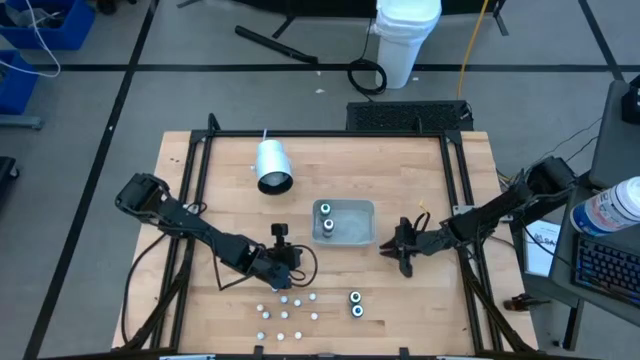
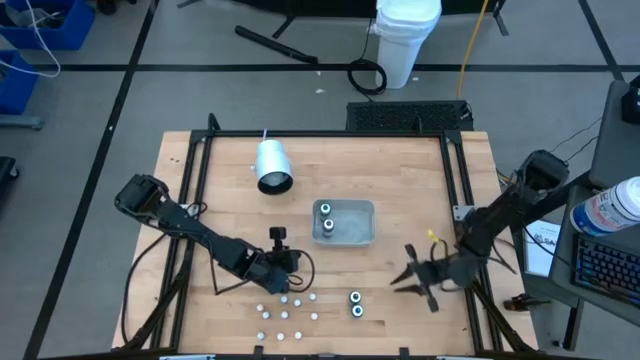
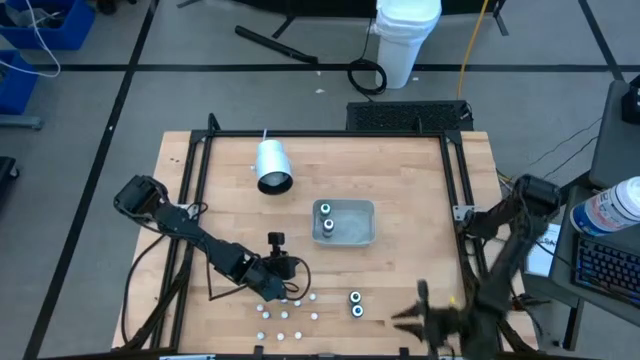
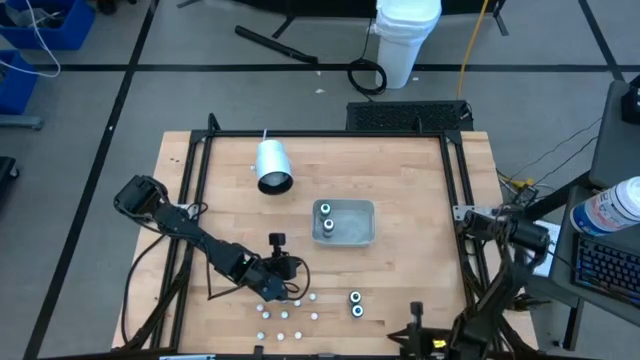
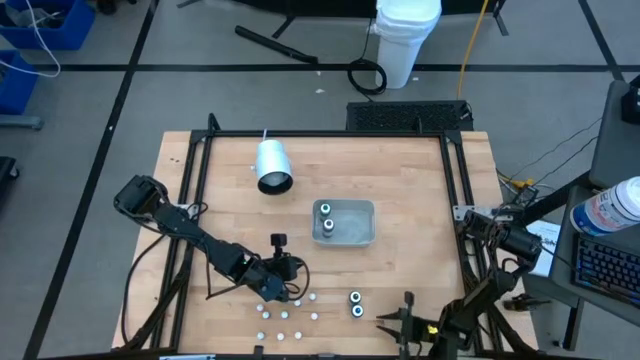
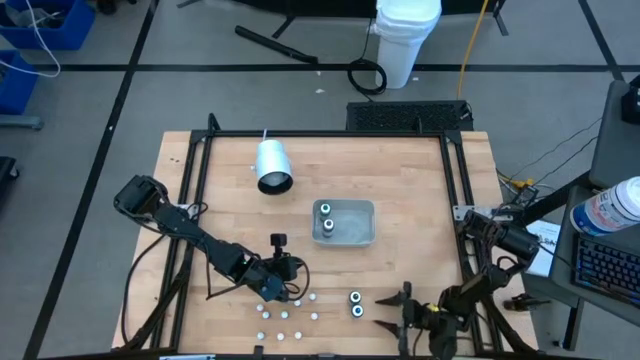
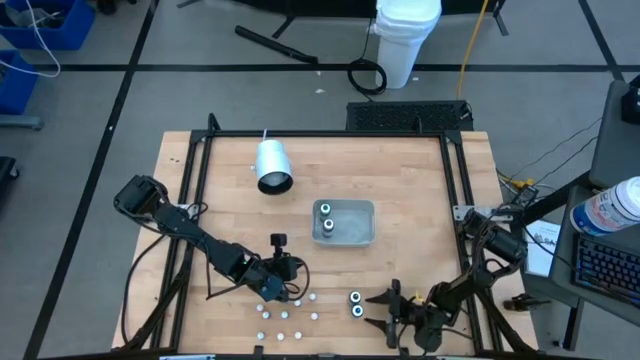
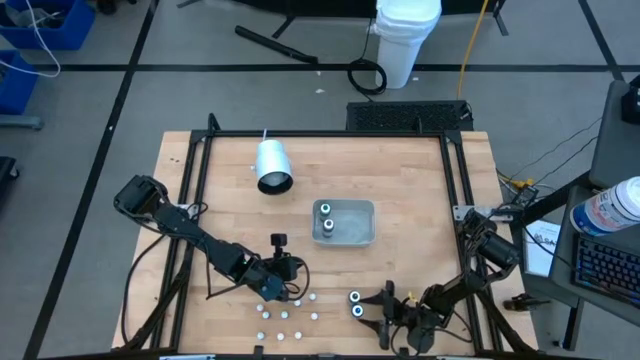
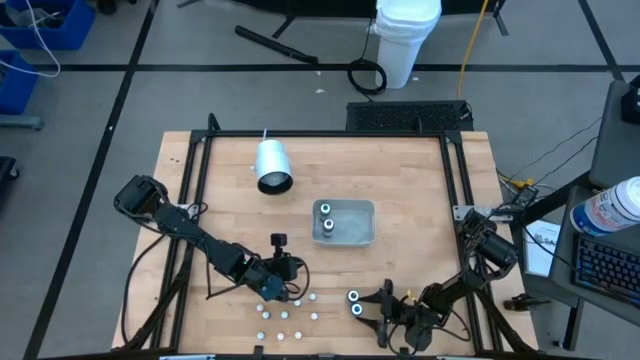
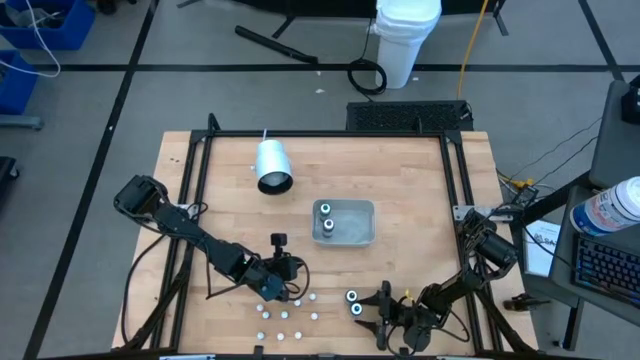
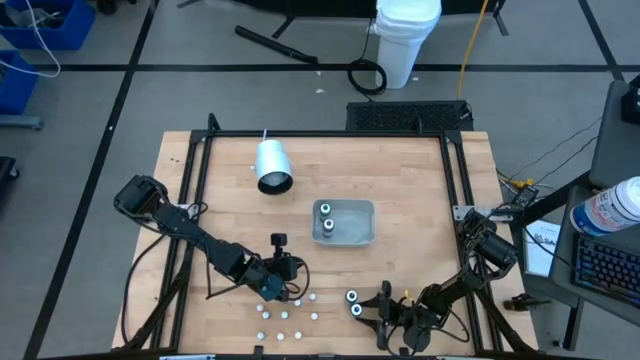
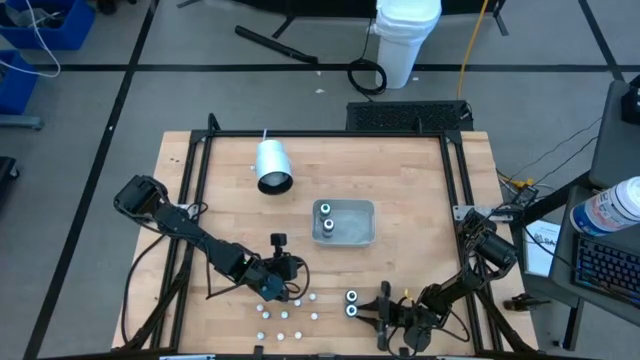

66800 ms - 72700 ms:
Task: Pick & Place food coloring
Put the large blue food coloring bottle into the white bin

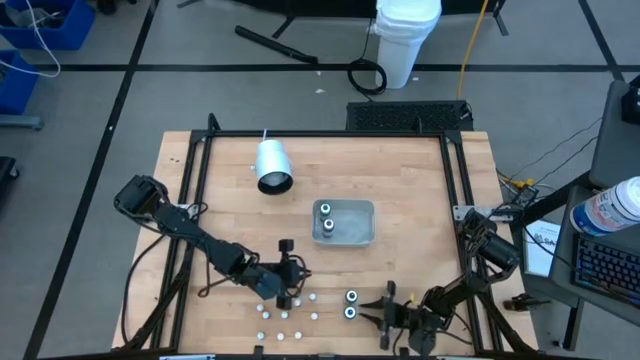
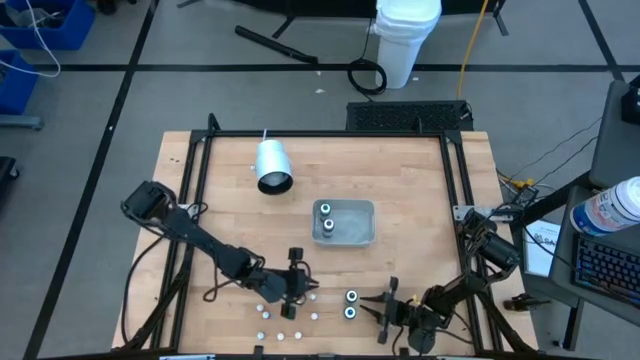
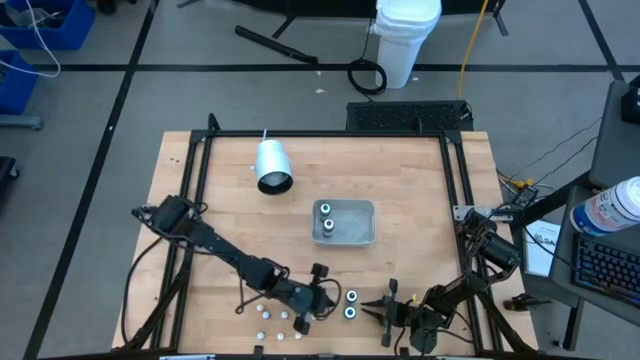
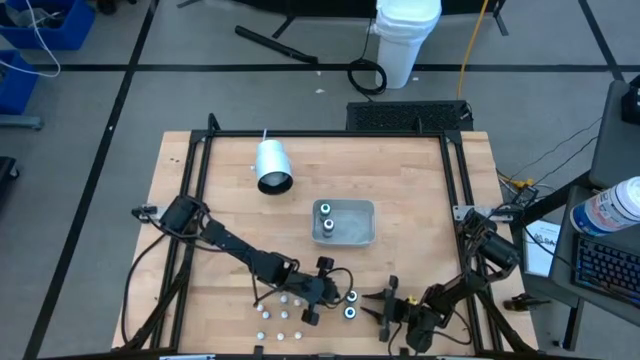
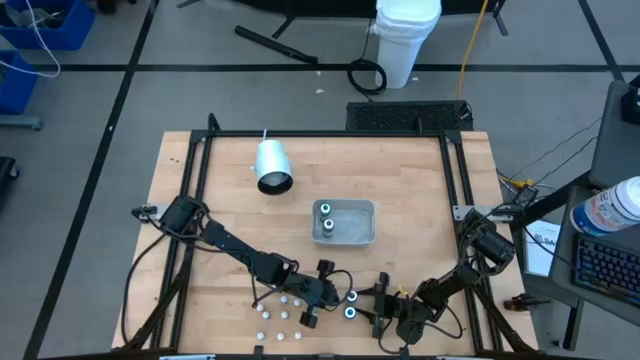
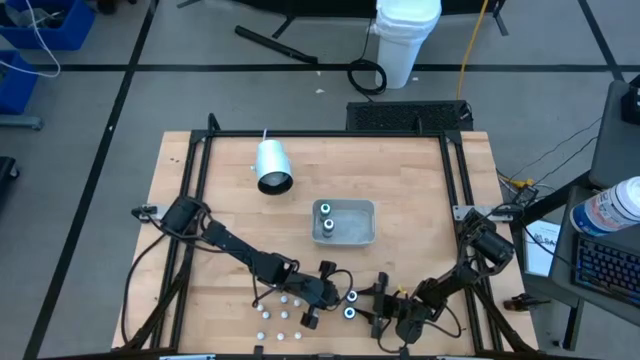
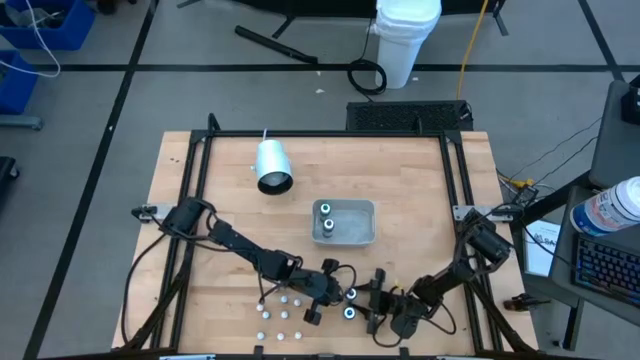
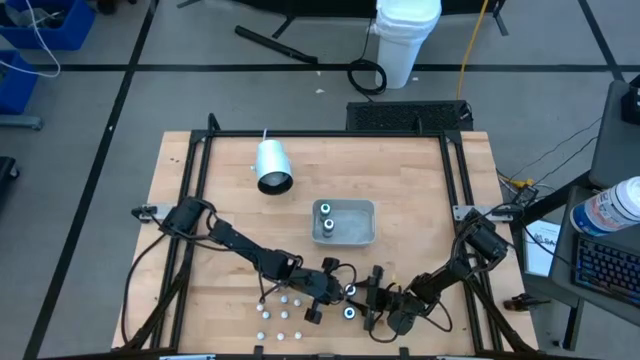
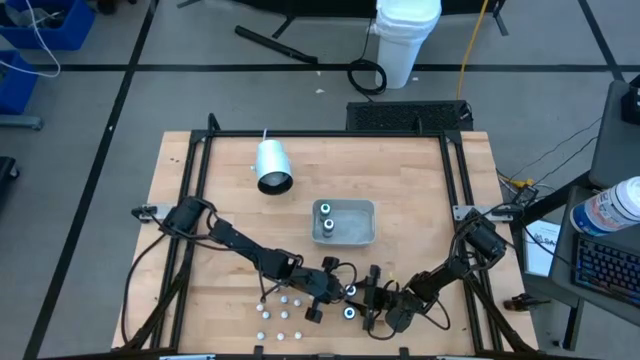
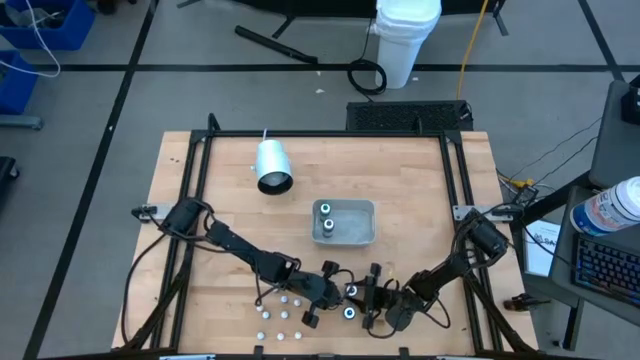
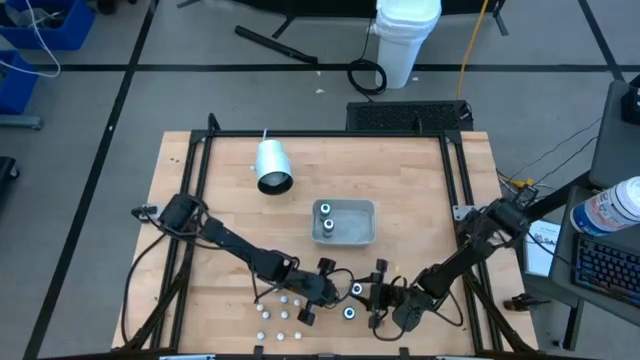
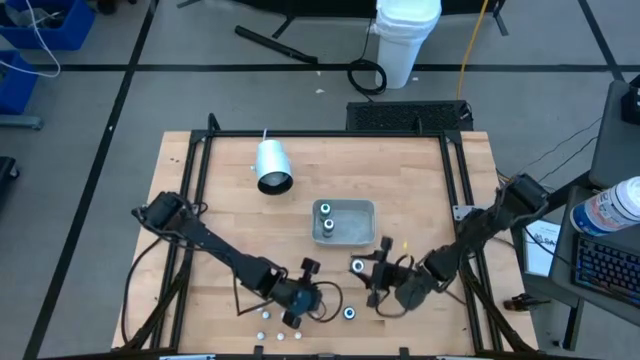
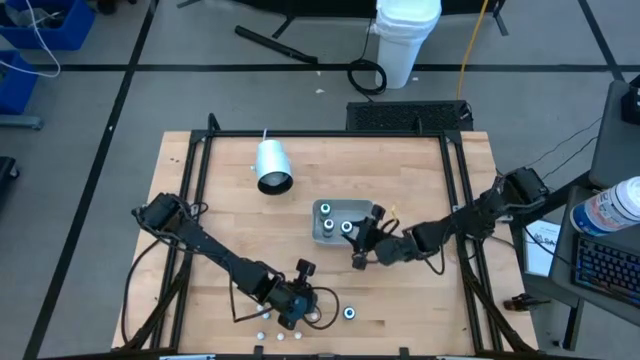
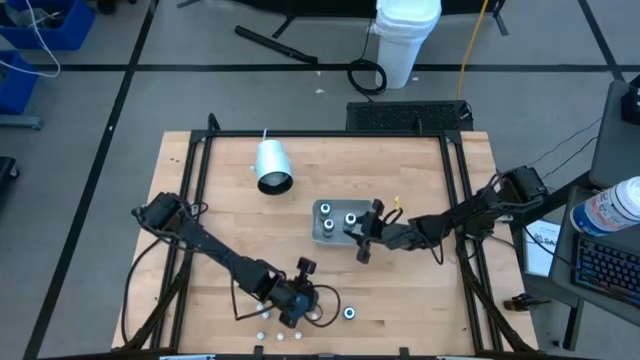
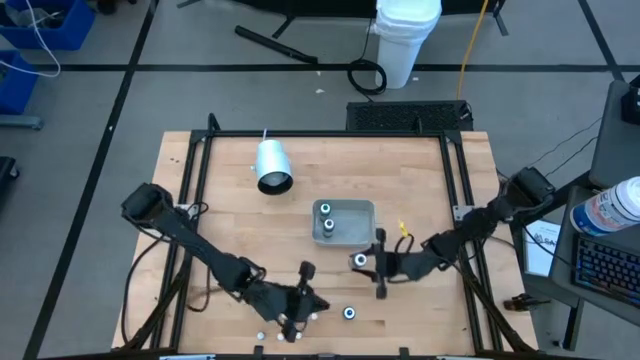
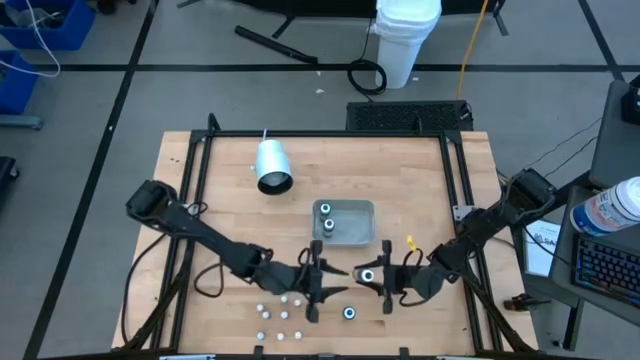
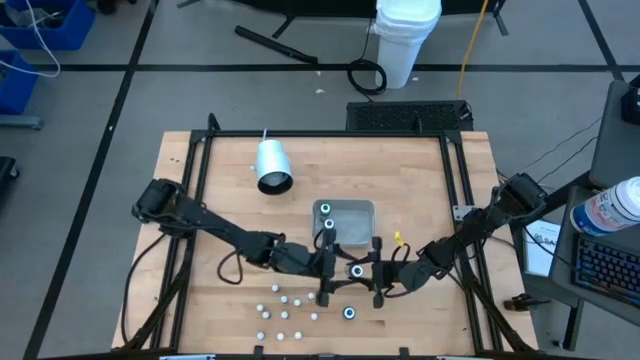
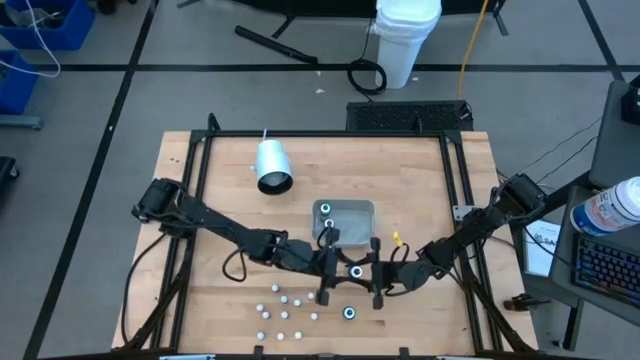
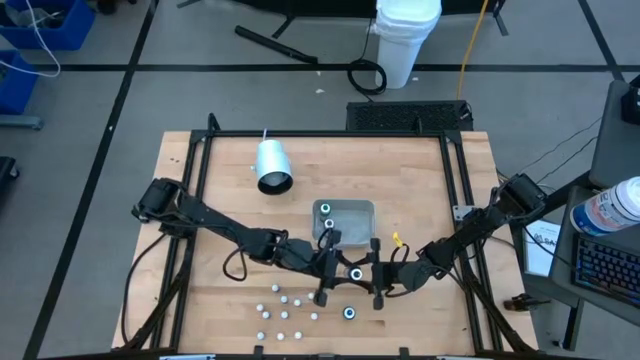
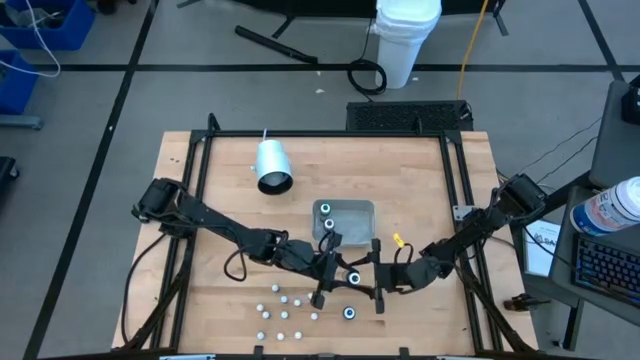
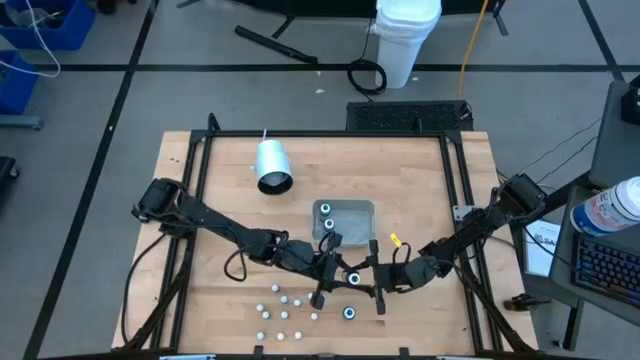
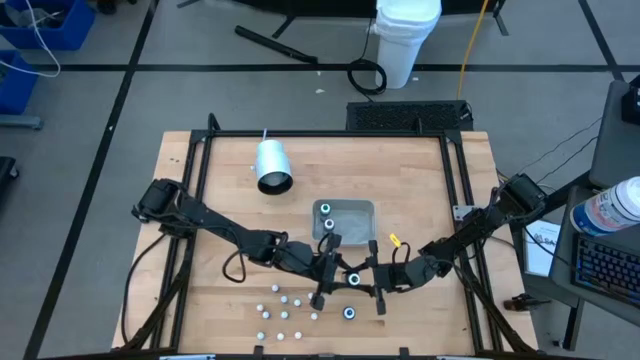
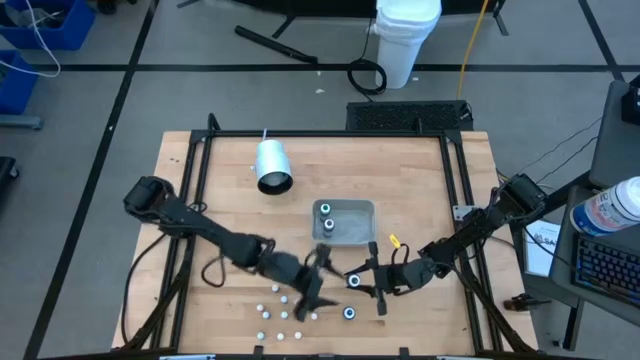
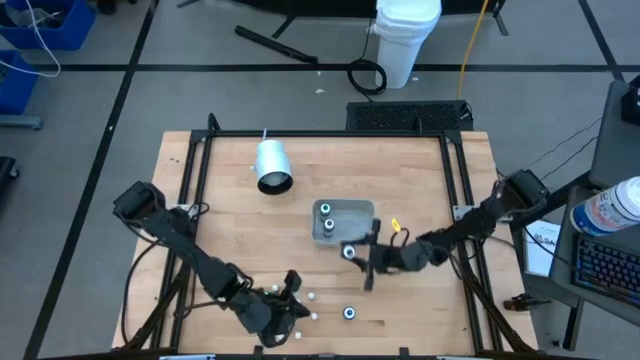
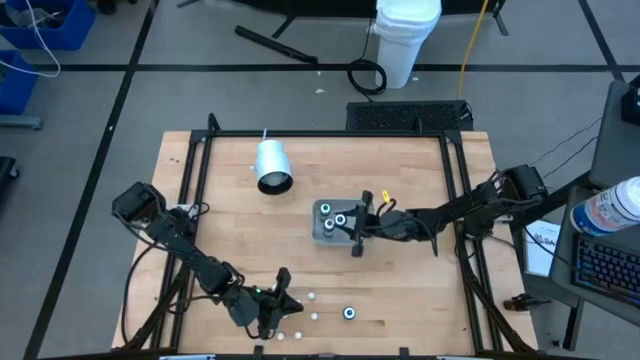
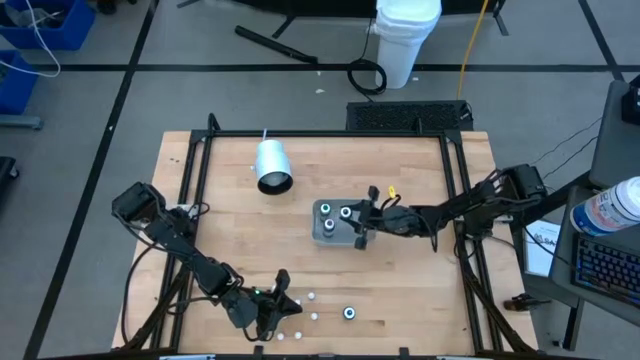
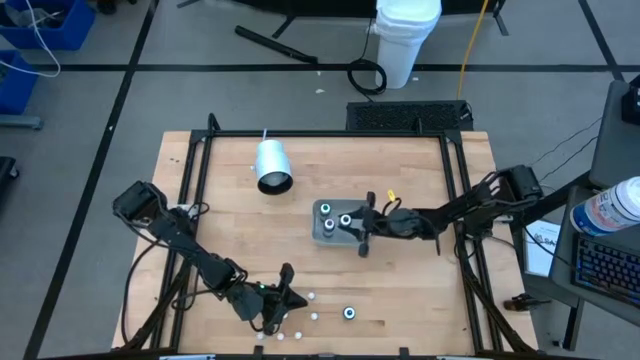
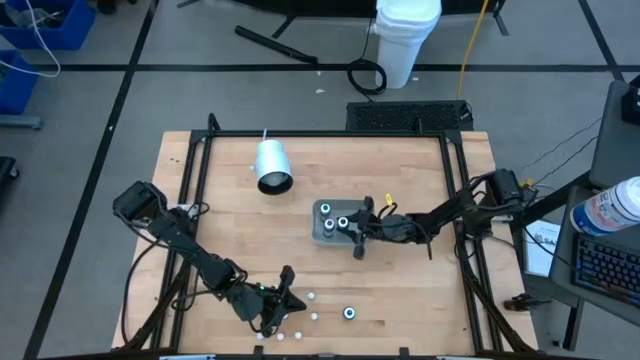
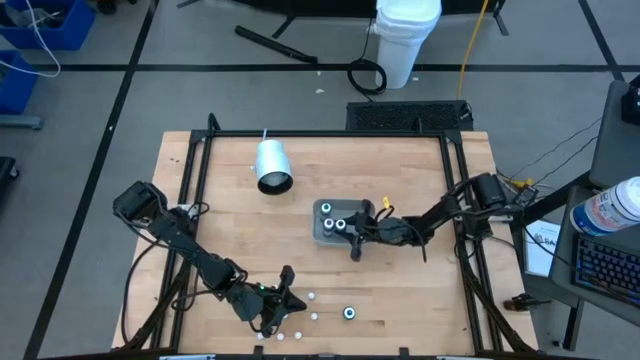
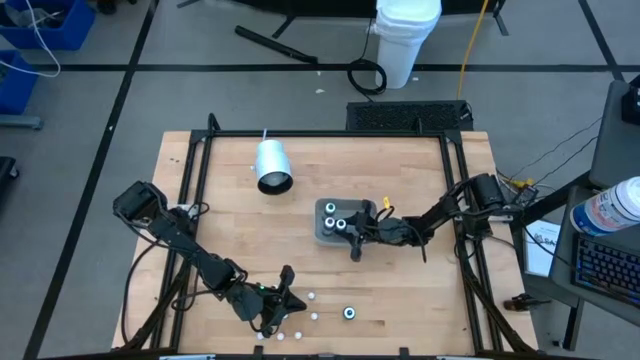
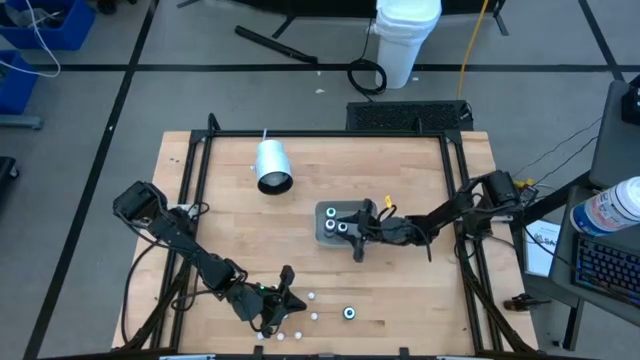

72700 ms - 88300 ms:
Put the large black food coloring bottle into the white bin
